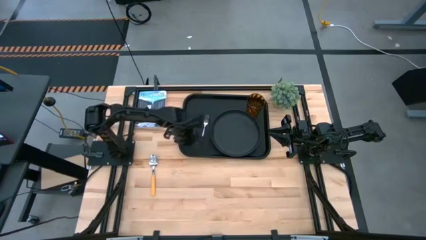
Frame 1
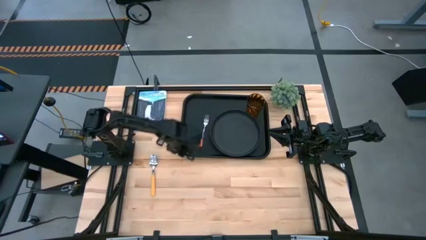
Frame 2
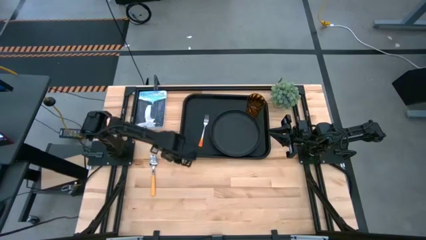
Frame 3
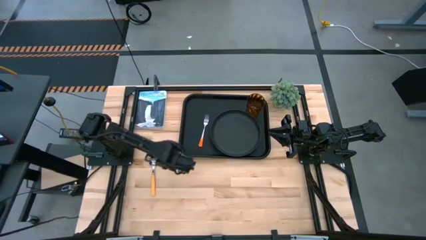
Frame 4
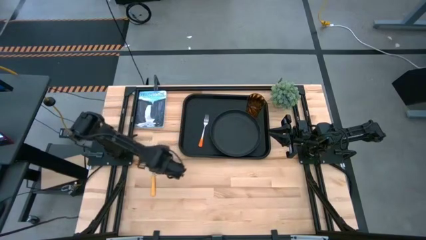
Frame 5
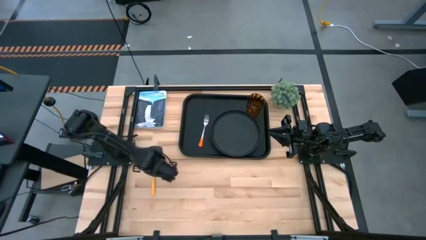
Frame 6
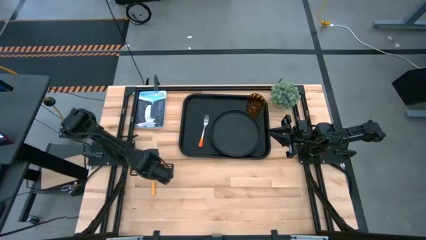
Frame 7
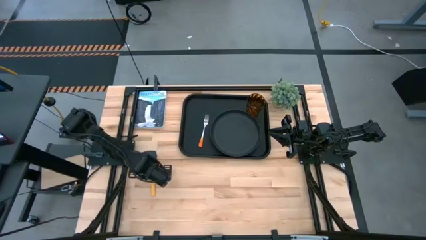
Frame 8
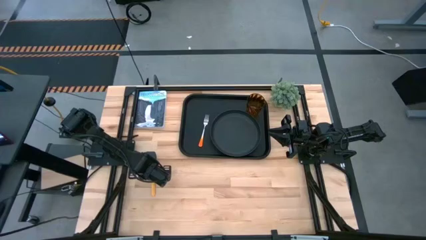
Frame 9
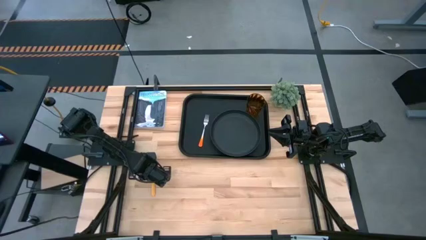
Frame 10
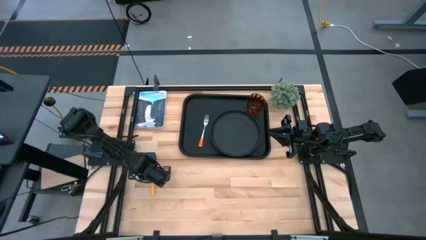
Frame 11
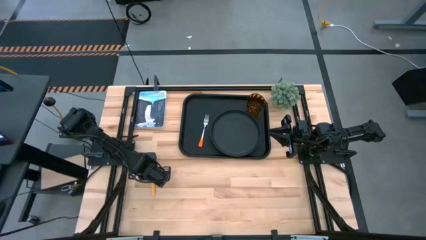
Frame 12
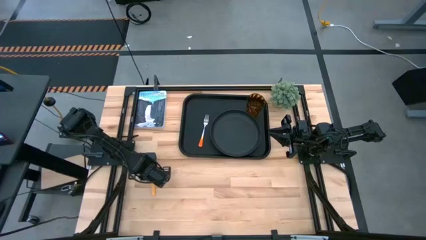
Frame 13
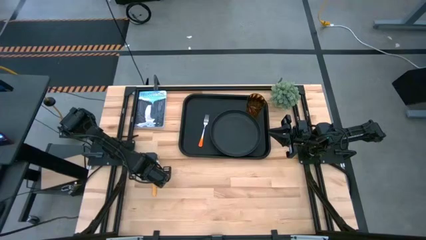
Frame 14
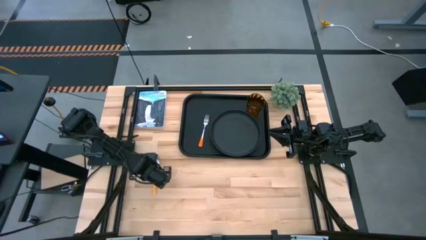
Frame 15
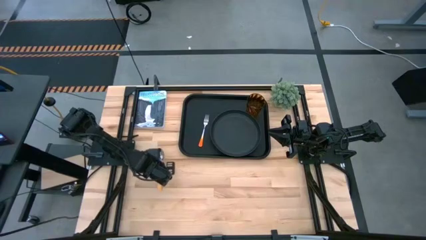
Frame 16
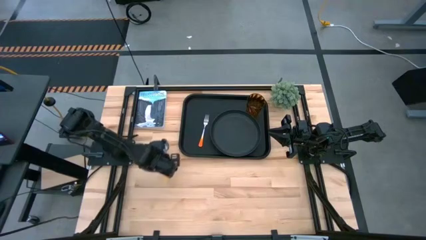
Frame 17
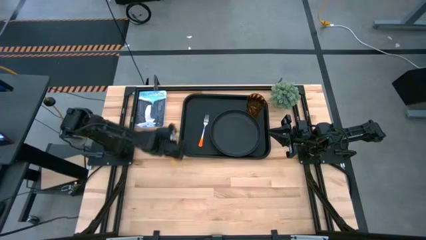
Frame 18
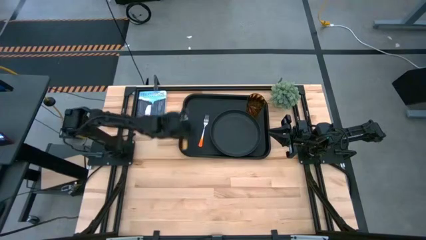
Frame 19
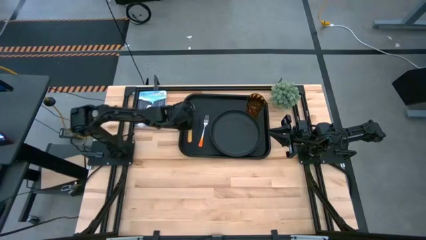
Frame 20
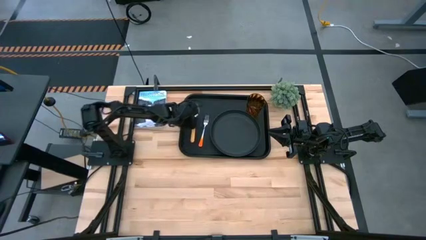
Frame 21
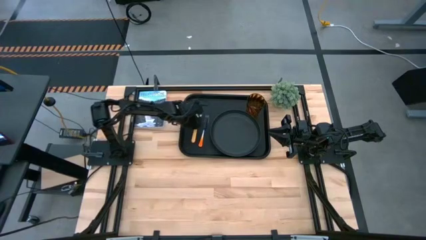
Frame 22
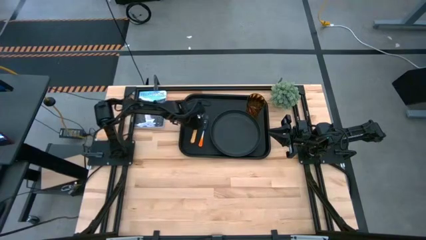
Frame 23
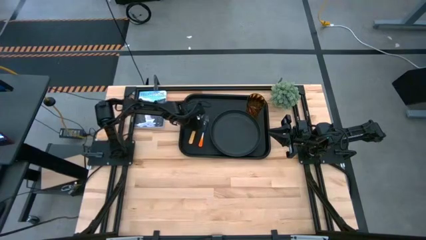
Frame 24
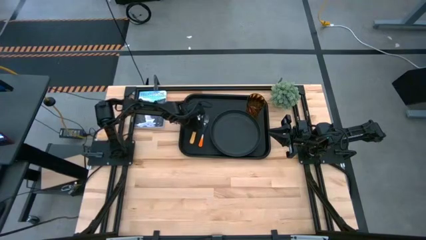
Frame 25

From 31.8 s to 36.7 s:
Task: Pick and place plate/cup/fork/spoon on tray
Put the yellow spoon beside the fork on the black serving tray

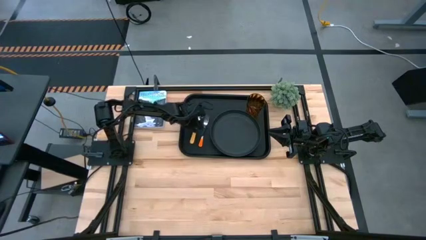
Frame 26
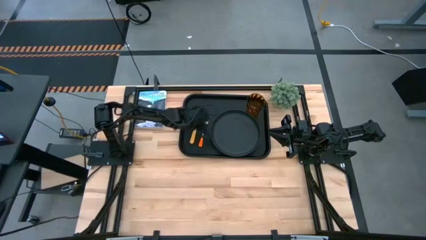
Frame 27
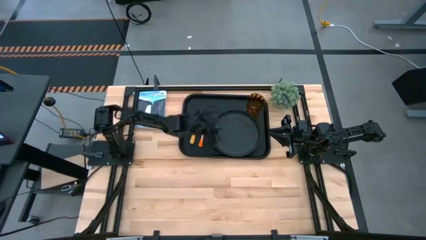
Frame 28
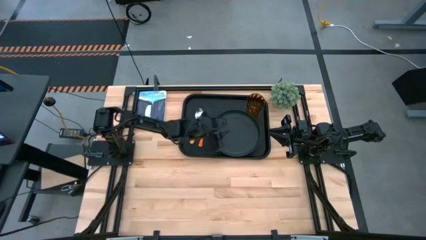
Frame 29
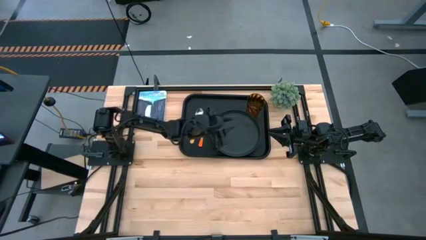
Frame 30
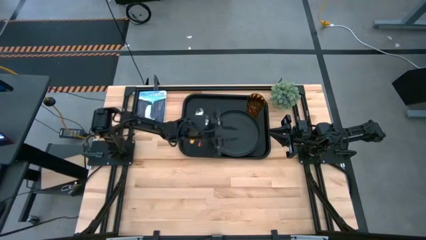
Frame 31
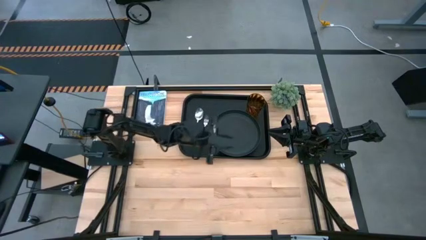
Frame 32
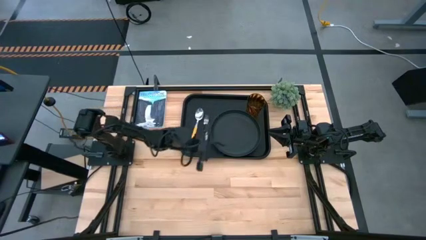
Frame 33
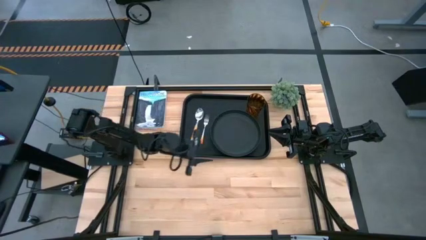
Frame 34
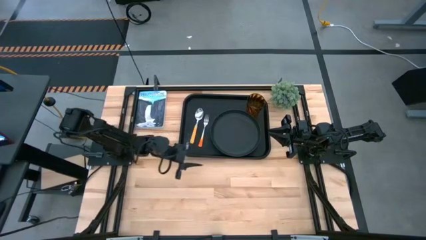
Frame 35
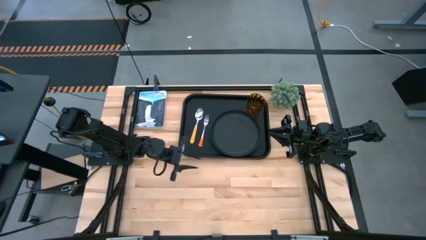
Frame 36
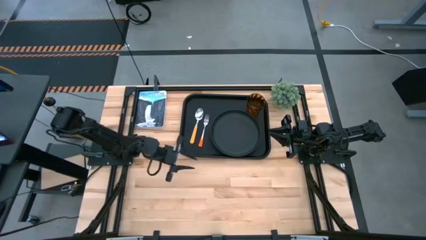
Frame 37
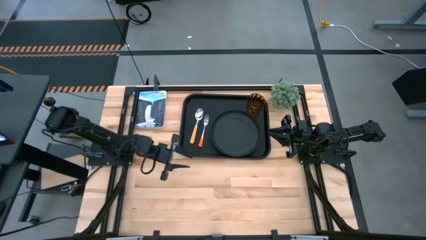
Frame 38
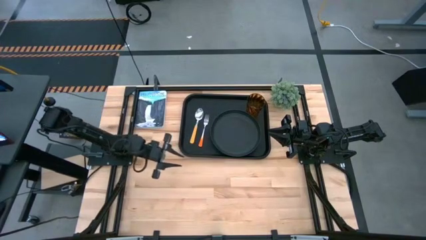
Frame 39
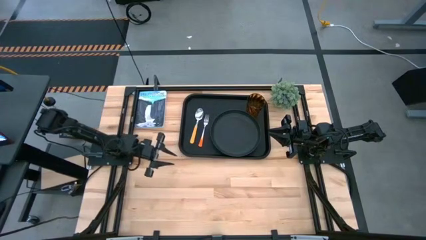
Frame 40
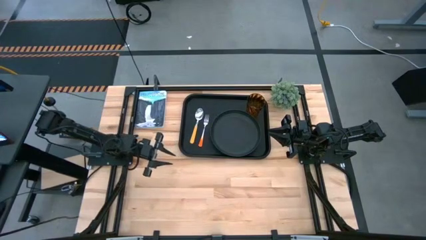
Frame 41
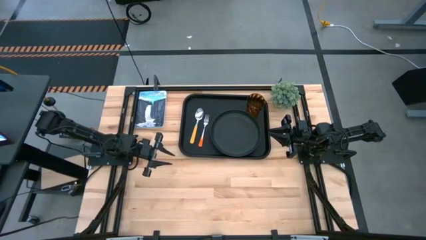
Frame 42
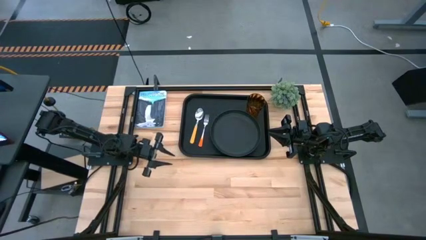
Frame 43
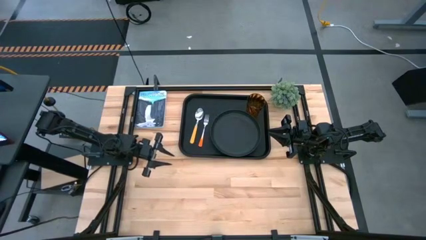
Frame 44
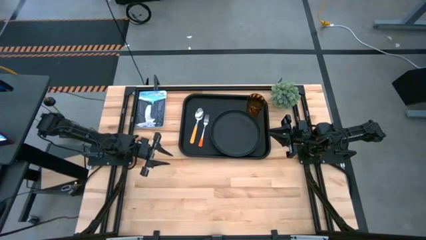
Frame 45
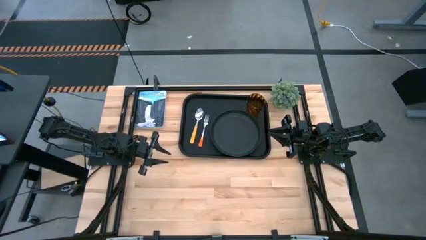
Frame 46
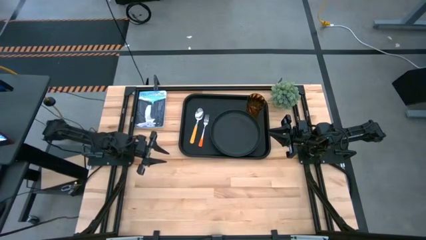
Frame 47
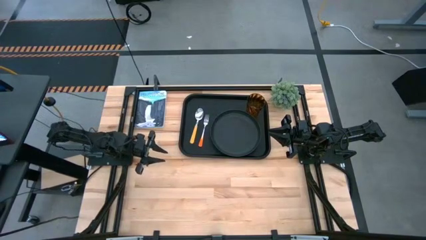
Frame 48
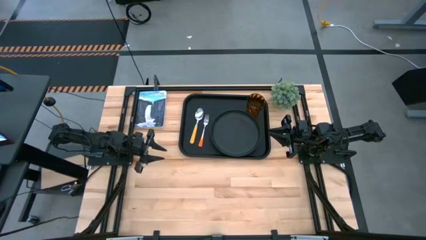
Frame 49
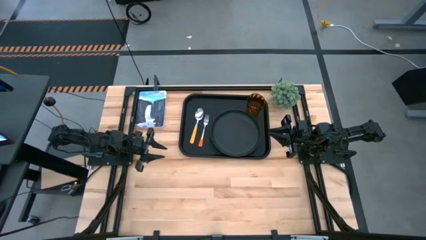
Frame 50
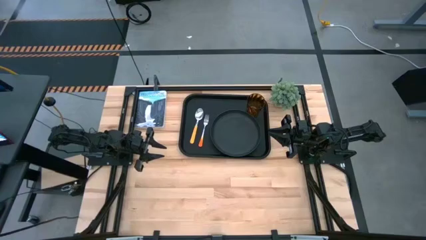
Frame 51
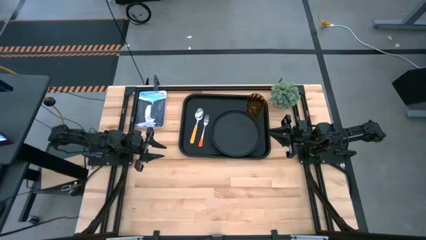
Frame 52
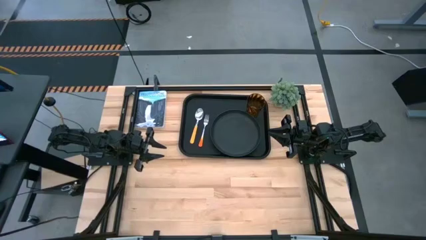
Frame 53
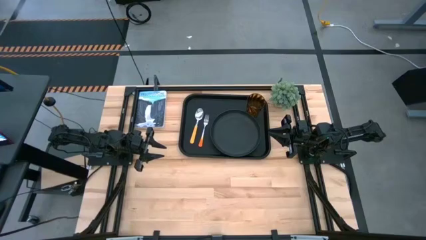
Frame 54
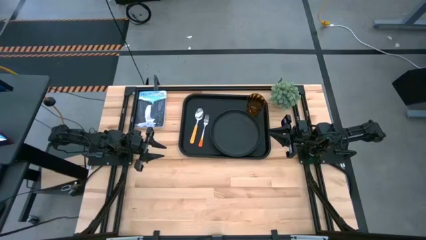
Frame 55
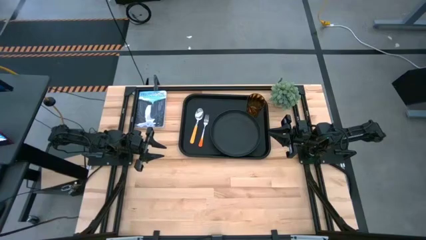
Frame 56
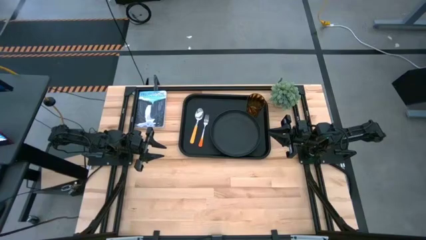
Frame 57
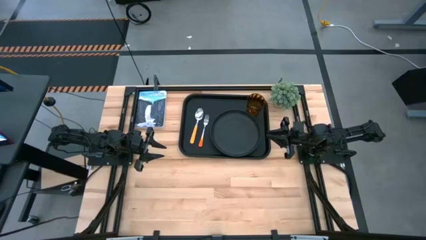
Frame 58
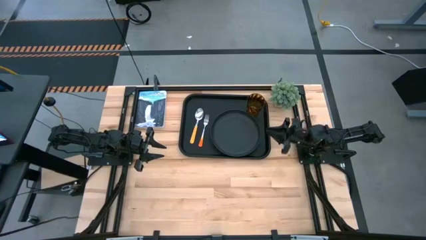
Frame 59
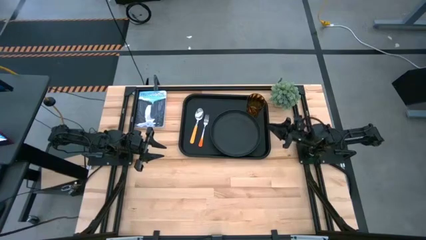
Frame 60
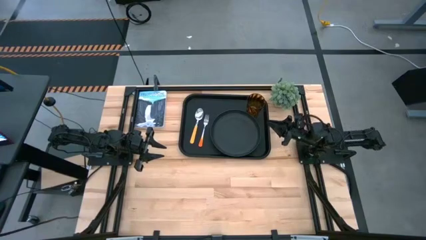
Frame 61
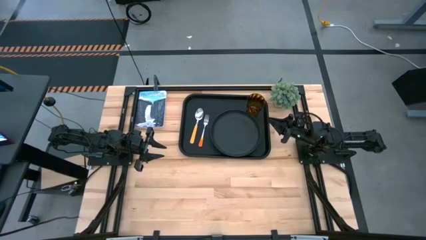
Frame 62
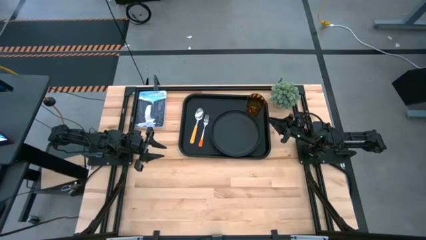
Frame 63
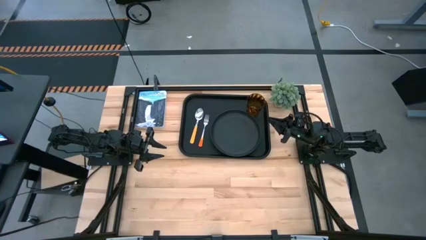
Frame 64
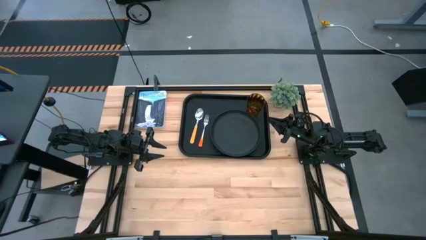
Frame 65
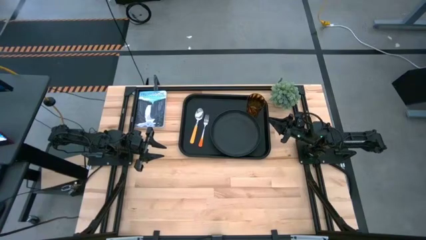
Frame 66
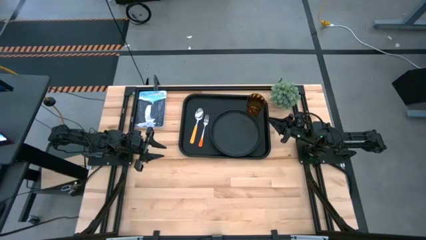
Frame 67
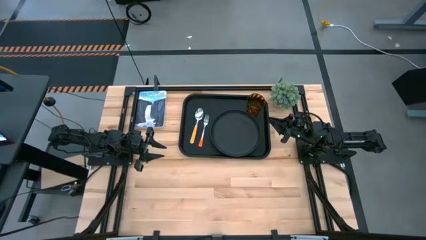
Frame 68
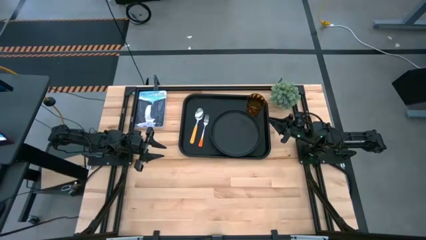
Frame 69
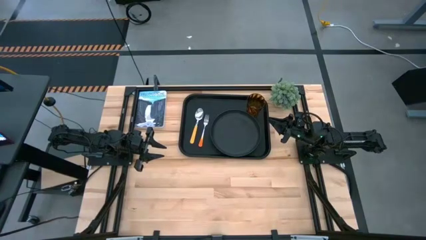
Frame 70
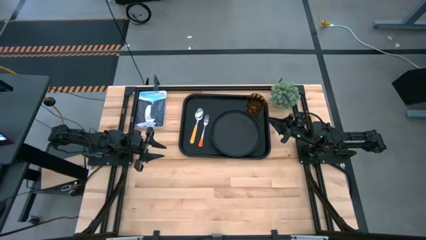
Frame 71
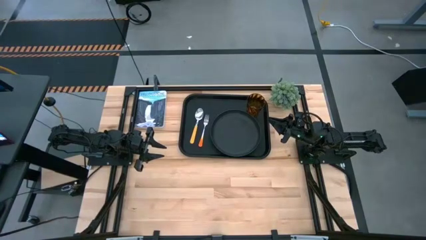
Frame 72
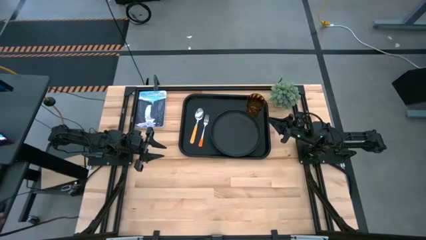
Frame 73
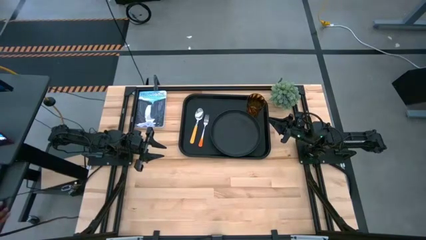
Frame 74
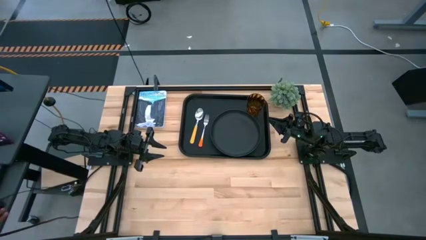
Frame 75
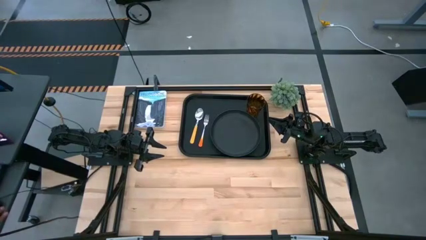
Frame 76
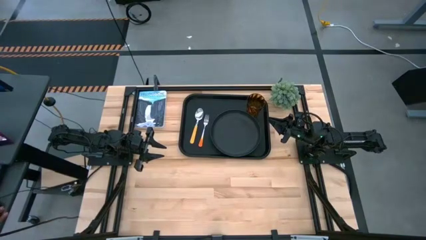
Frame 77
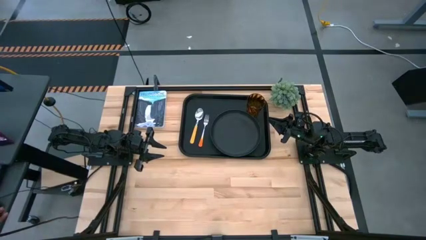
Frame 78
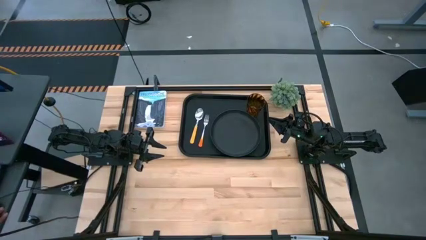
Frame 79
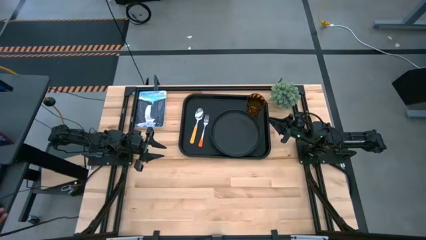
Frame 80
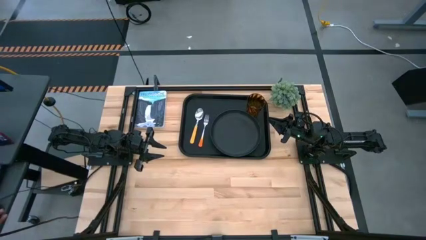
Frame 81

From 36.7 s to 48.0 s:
Return to Home Position

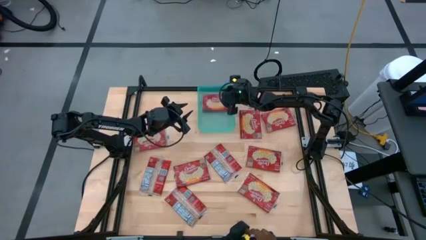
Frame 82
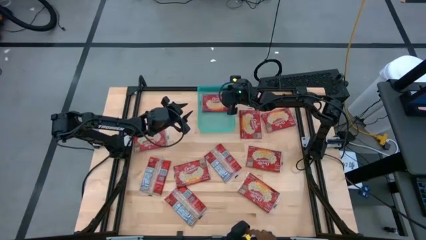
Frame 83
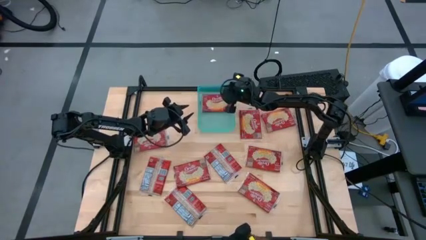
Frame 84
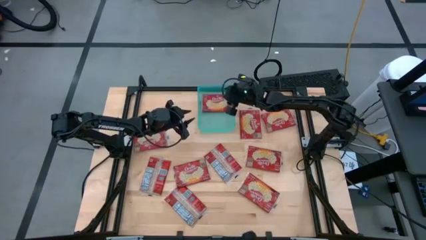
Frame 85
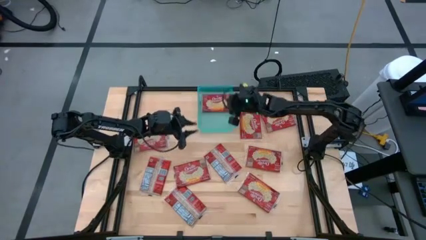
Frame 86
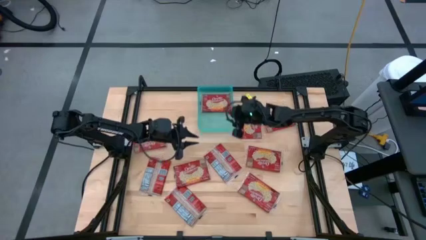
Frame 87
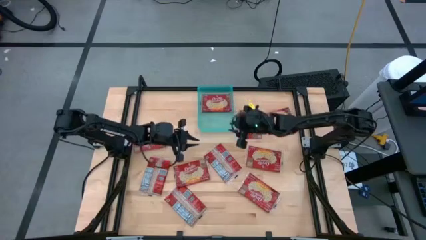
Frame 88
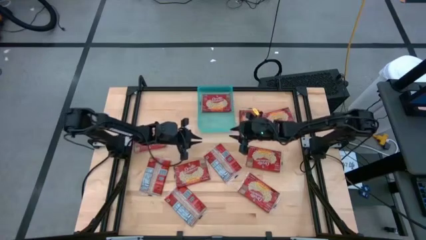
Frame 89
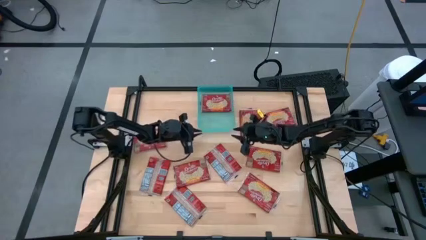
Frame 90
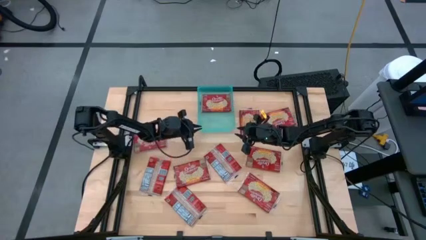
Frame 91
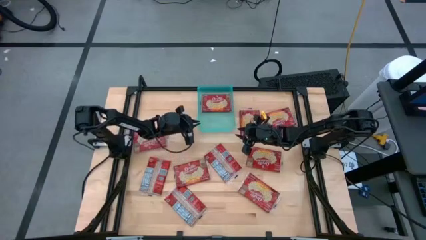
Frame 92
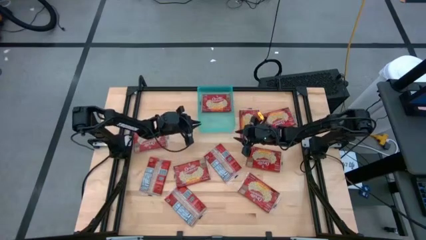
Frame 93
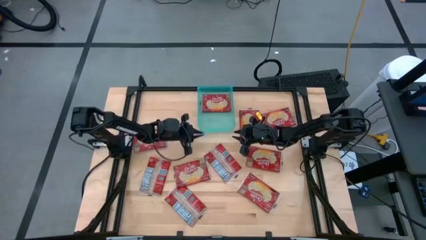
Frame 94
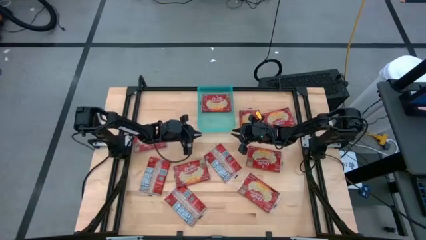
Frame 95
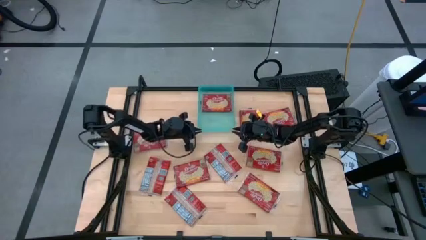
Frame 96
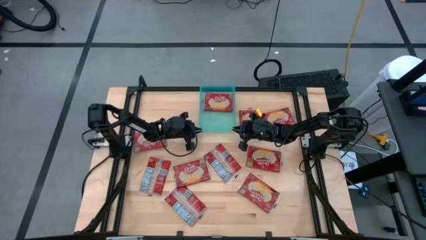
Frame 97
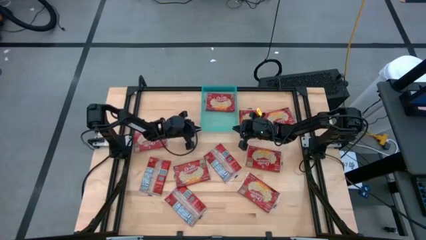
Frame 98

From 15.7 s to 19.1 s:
Task: Sort popcorn bags into baskets
Adjust the blue bin
